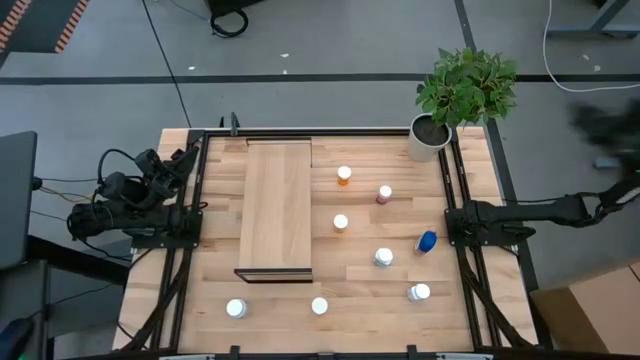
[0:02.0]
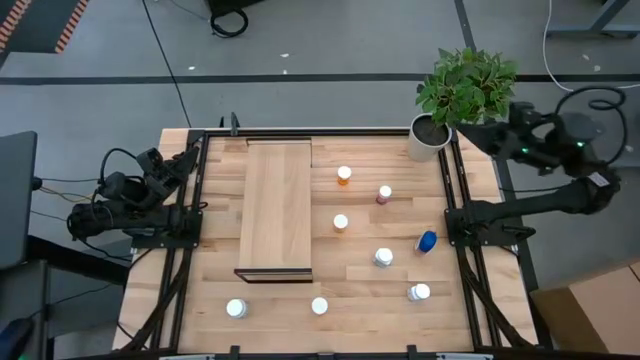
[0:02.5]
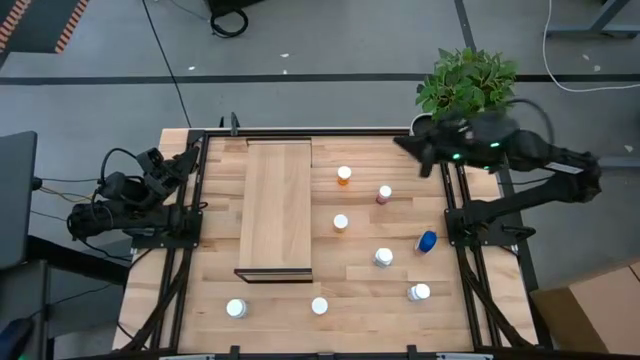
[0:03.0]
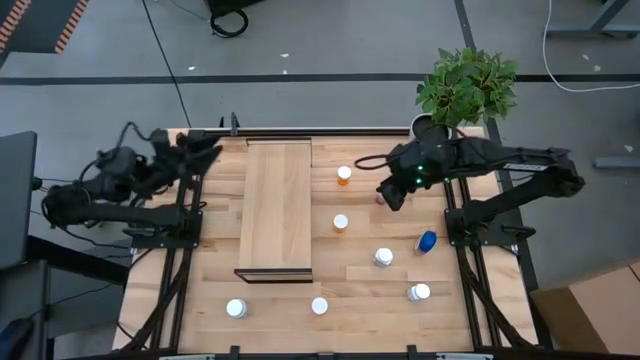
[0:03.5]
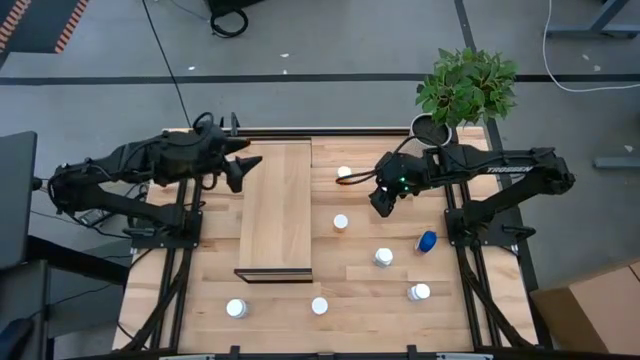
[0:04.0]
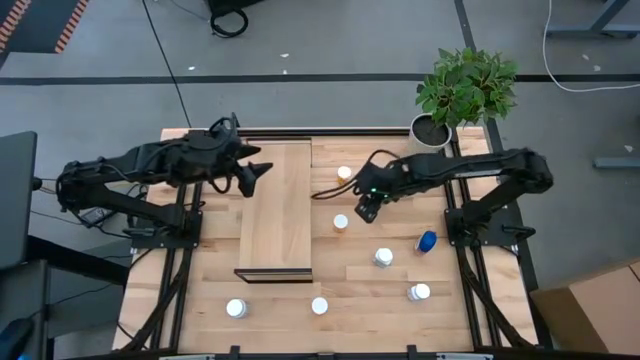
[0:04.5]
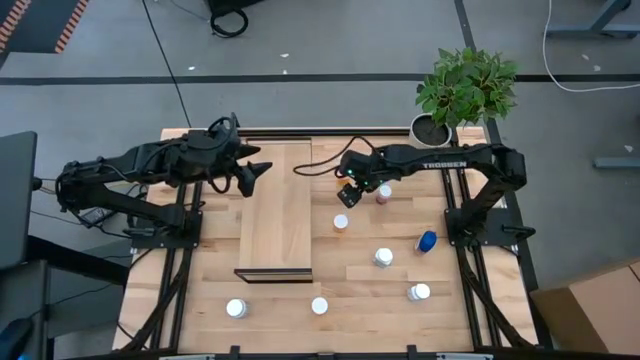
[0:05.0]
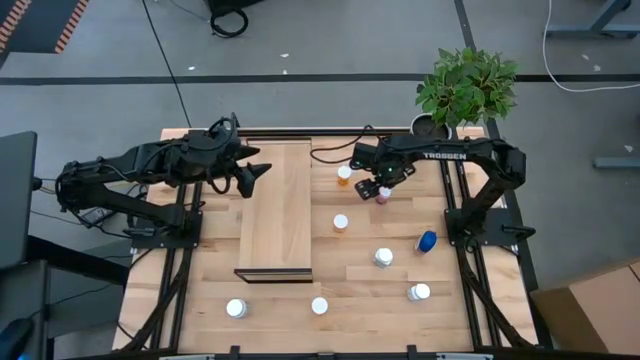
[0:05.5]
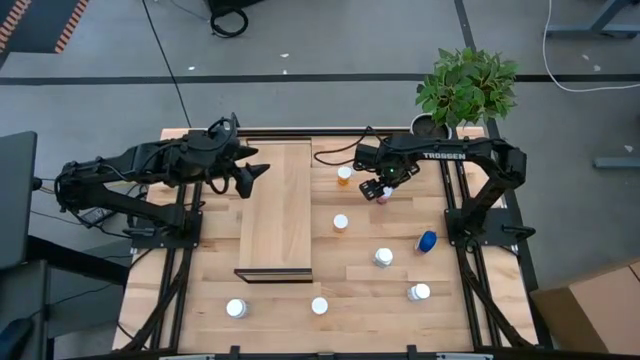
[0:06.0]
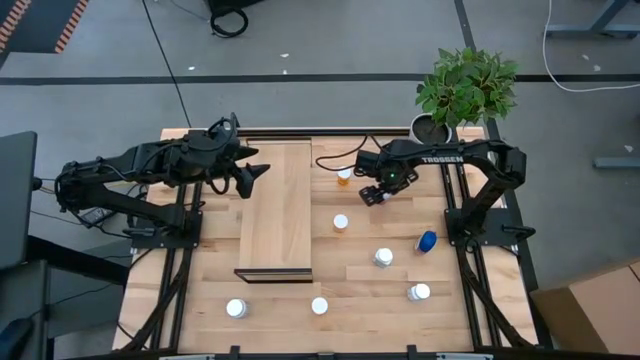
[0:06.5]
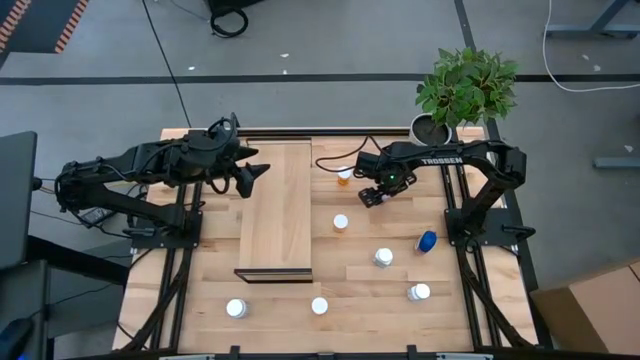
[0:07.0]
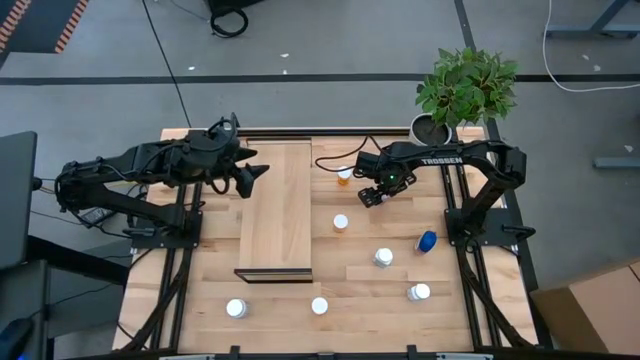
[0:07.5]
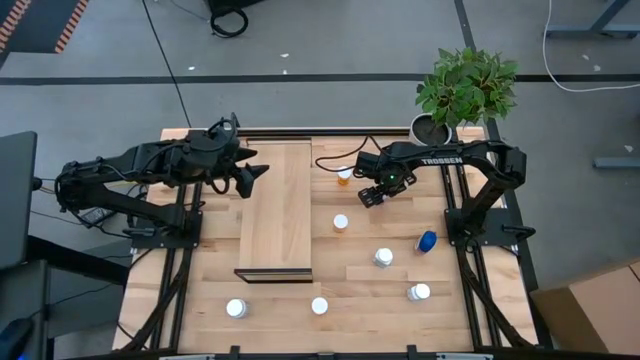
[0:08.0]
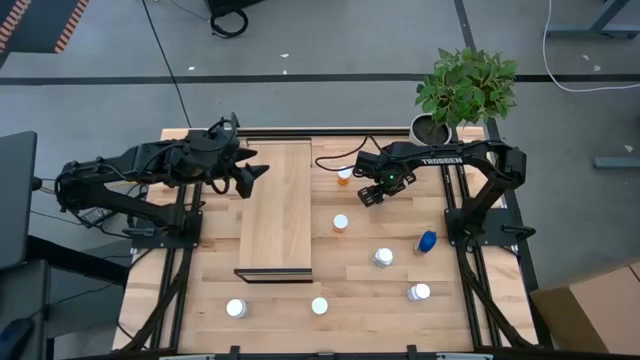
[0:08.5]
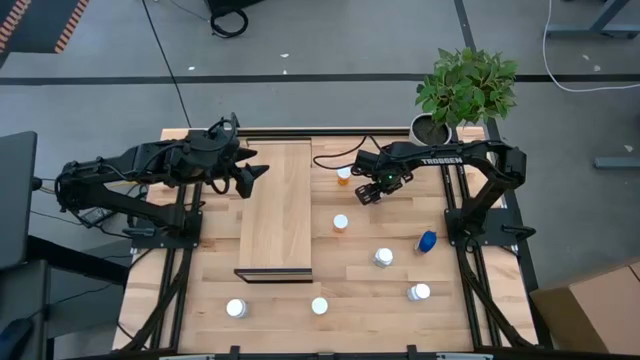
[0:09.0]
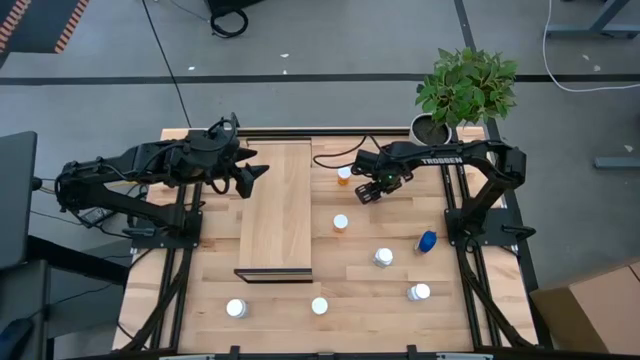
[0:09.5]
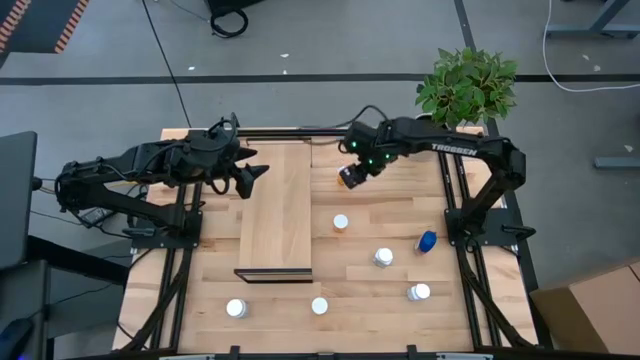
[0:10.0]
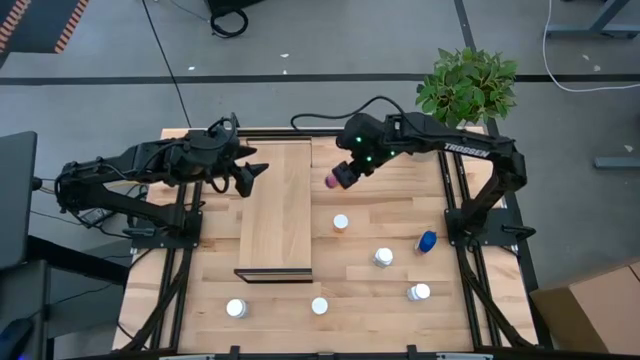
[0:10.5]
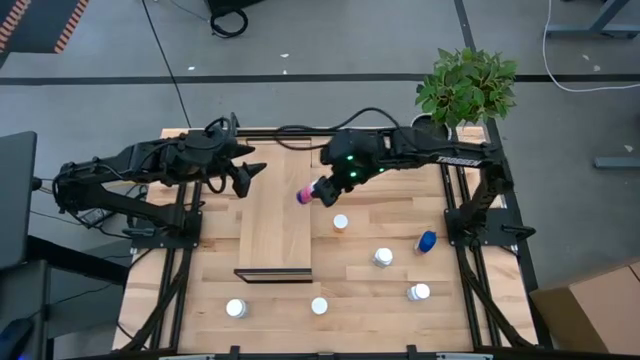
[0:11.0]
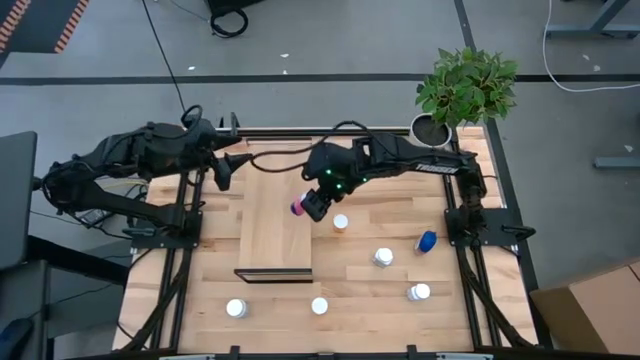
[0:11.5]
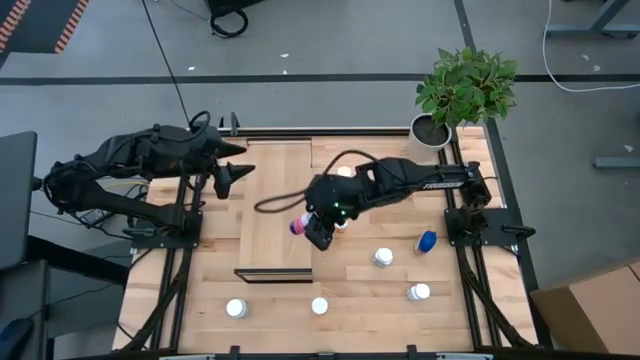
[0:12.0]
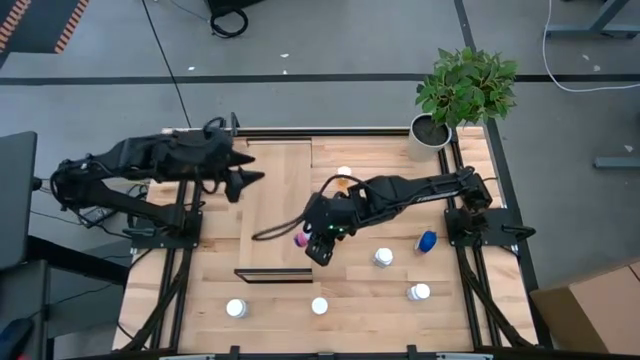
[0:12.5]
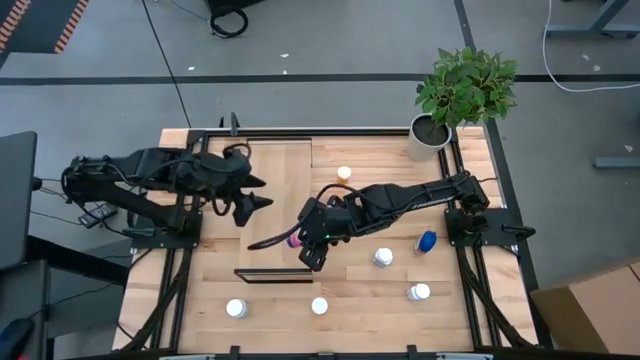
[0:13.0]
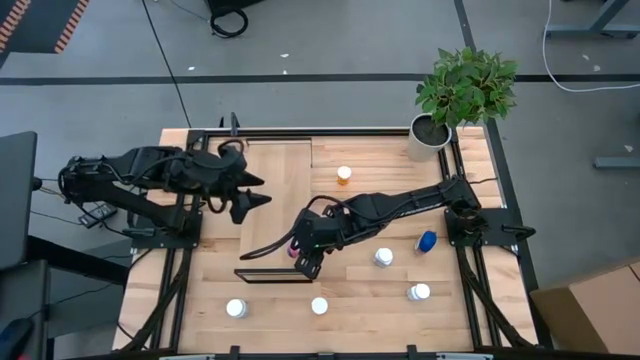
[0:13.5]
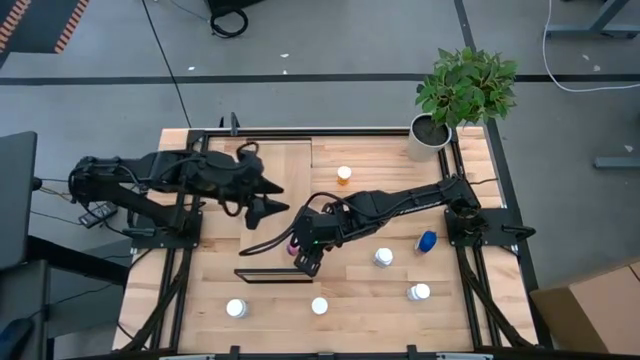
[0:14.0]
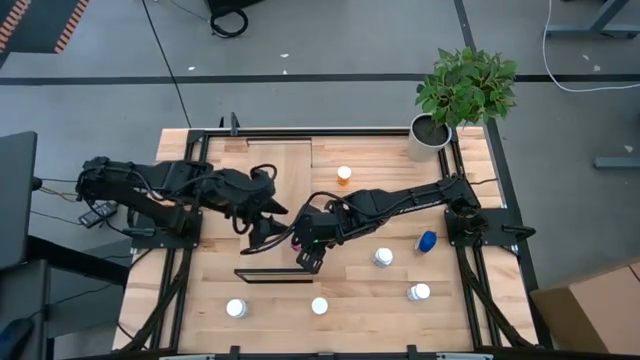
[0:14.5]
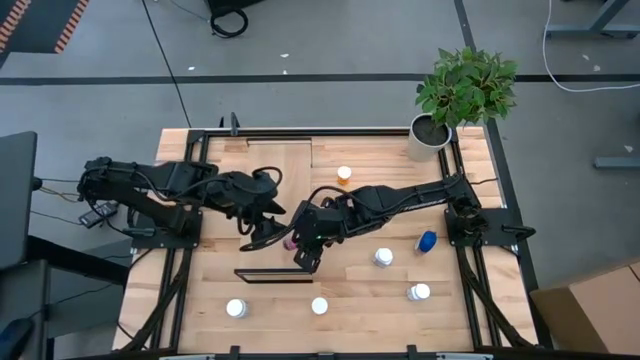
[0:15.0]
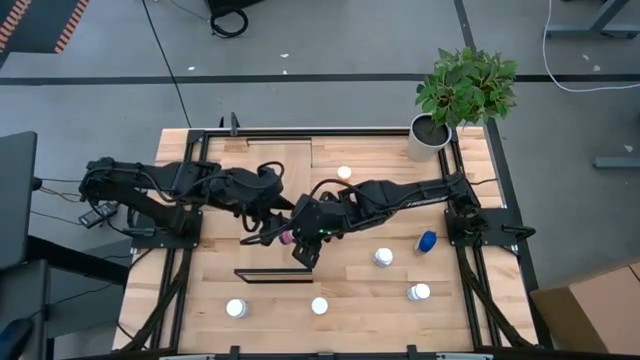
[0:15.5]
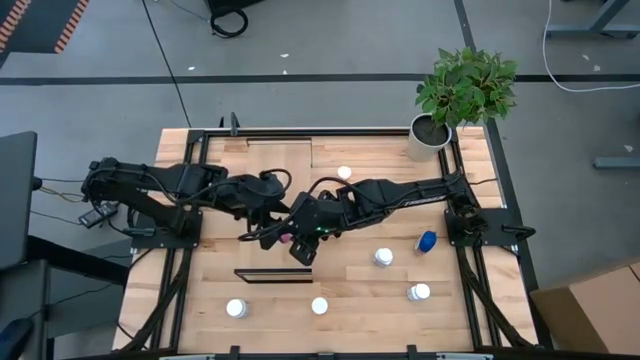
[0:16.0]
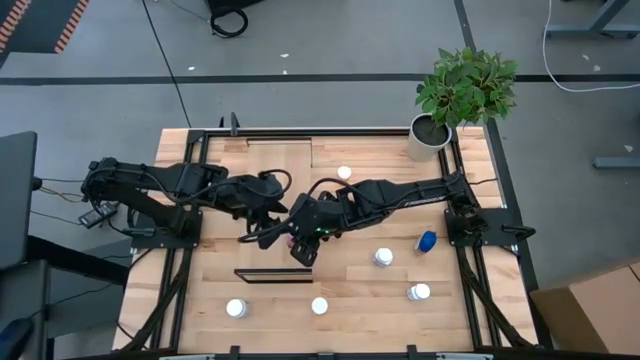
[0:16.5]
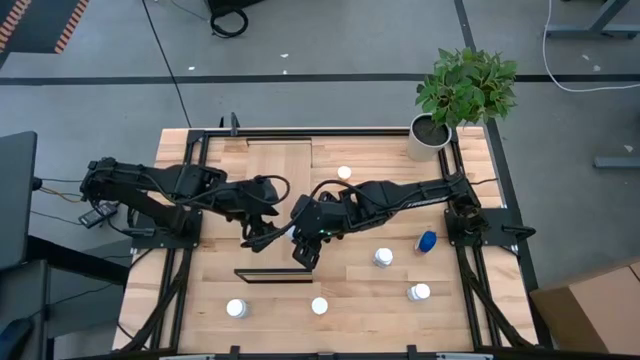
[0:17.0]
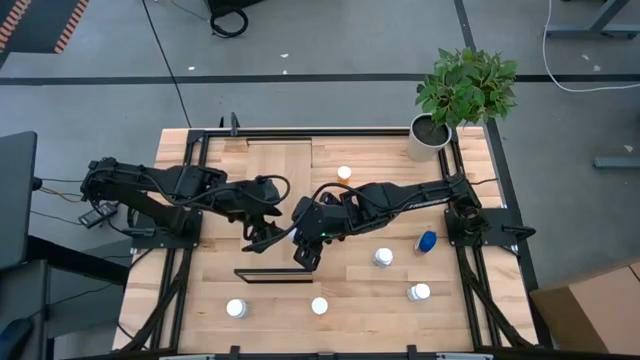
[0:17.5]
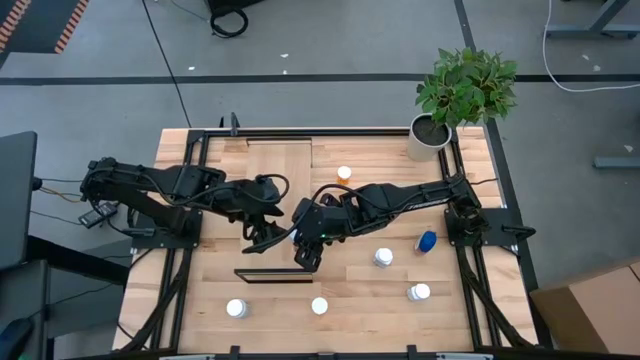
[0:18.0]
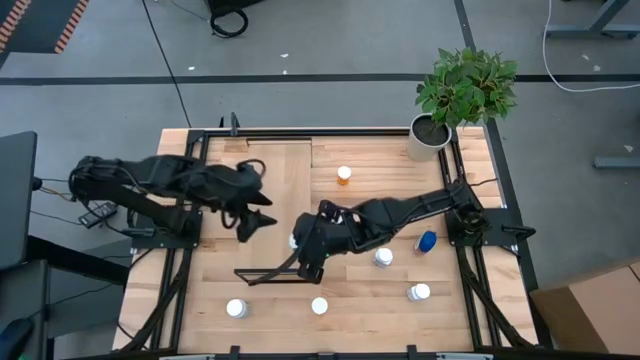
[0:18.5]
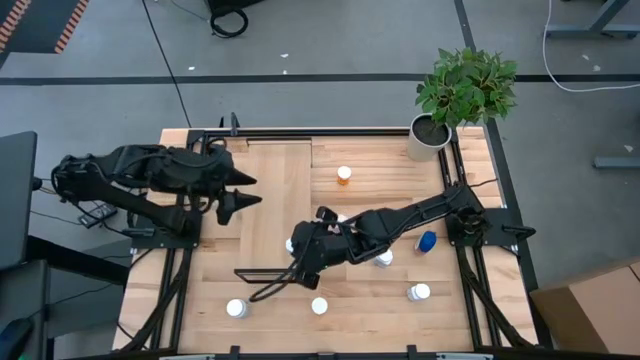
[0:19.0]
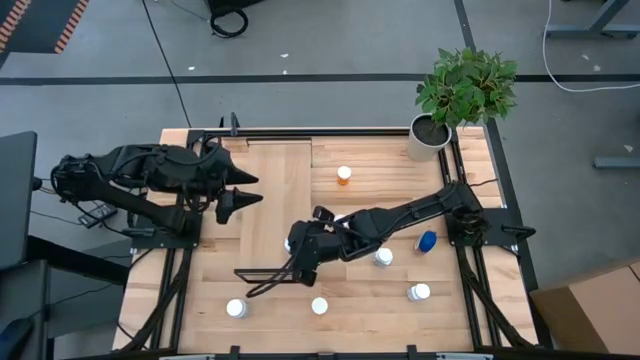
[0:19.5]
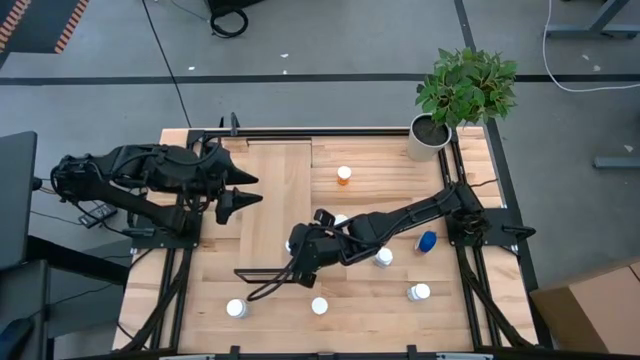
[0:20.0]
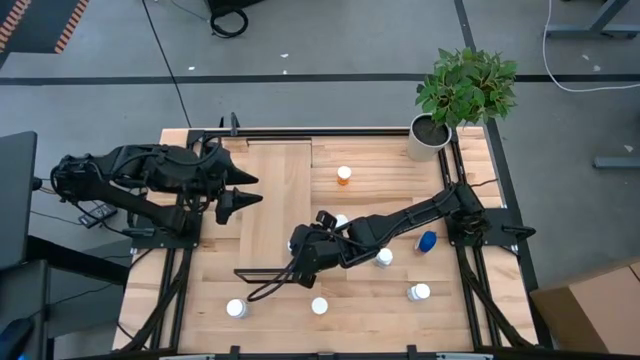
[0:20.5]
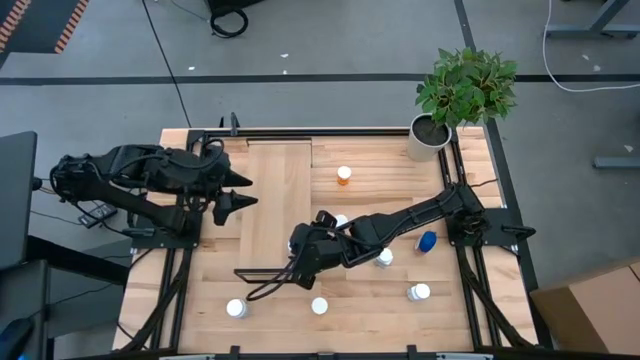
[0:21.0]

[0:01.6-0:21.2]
Task: Pick and place medicine bottles onto shelf by color
Put the pink pill bottle on the shelf
